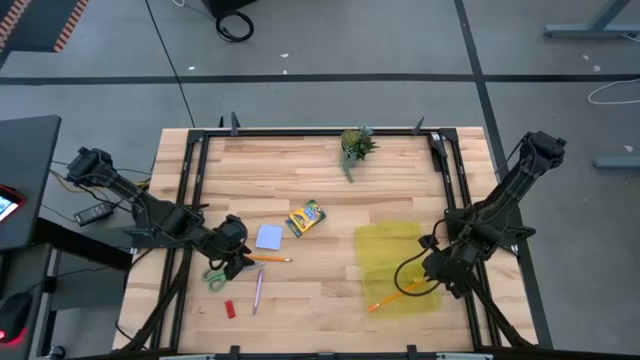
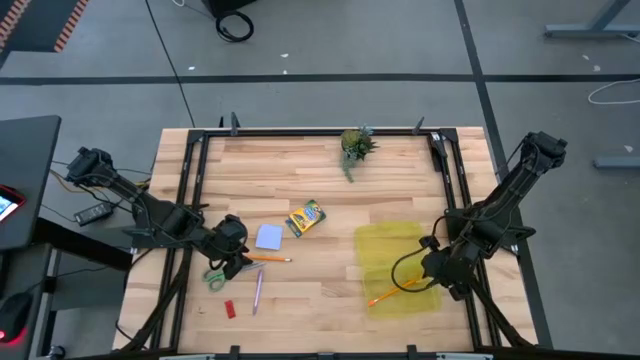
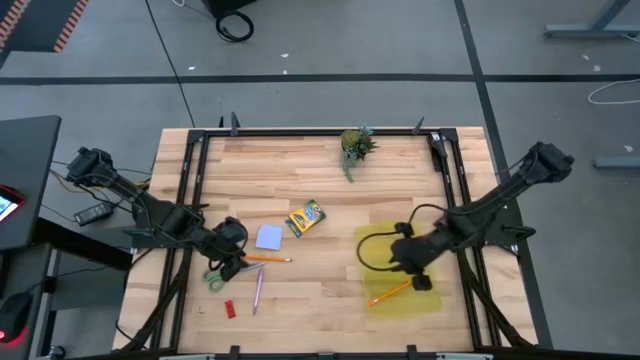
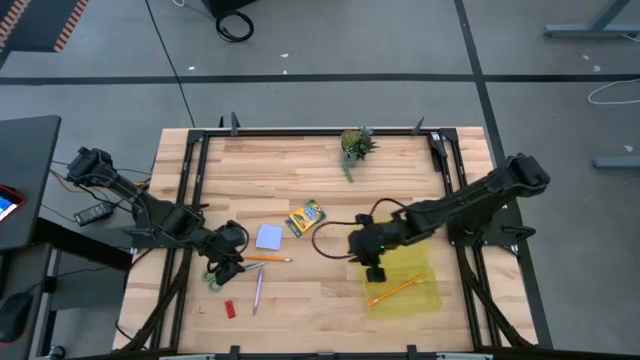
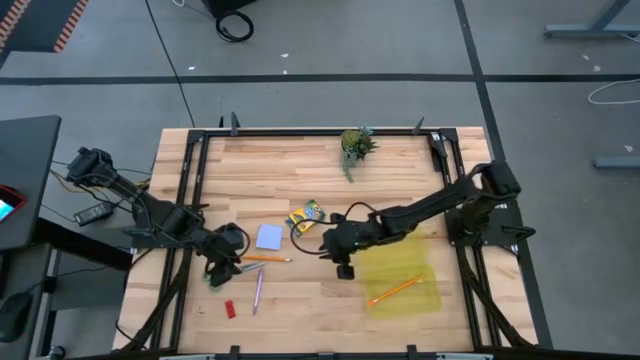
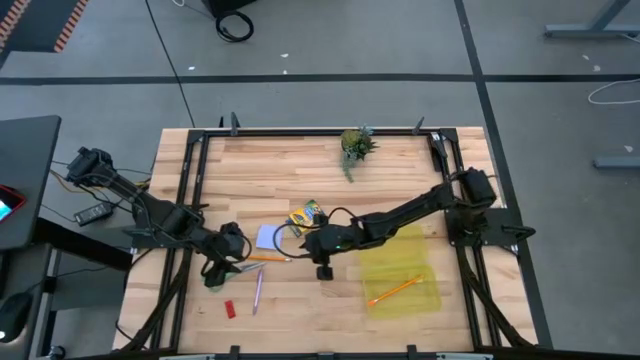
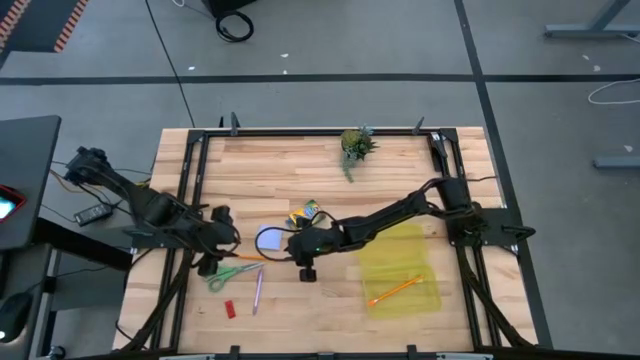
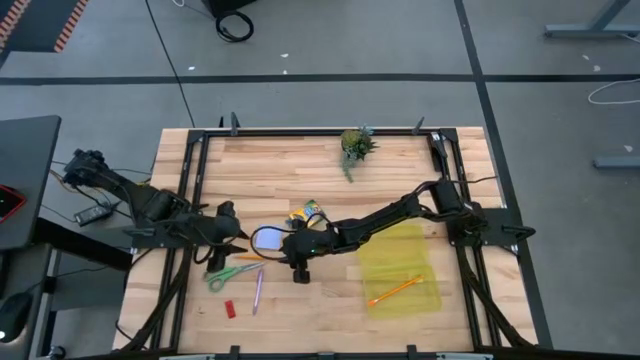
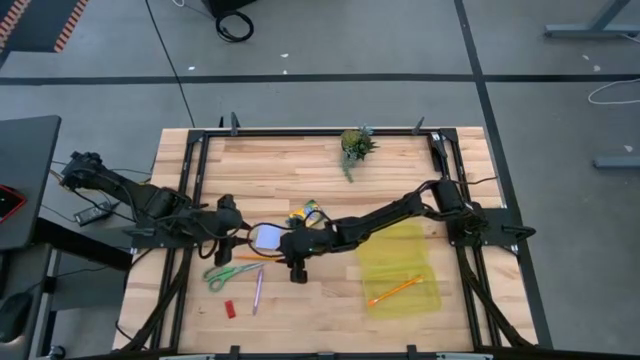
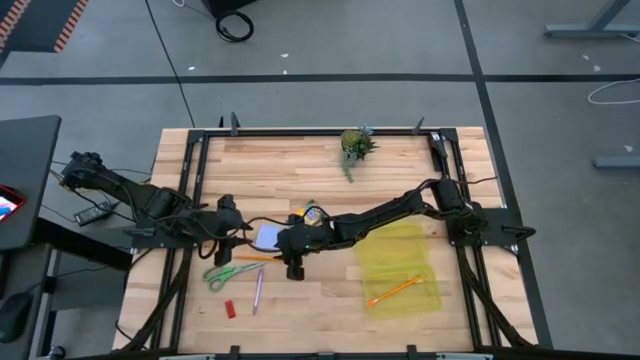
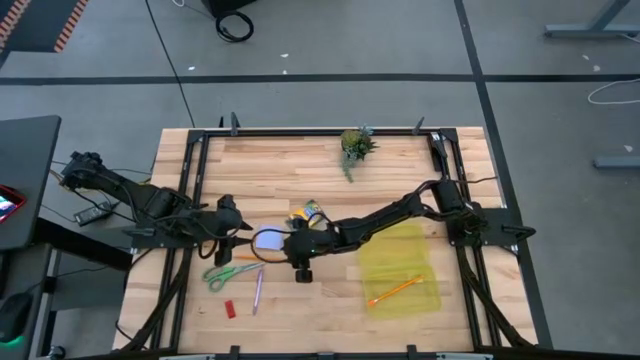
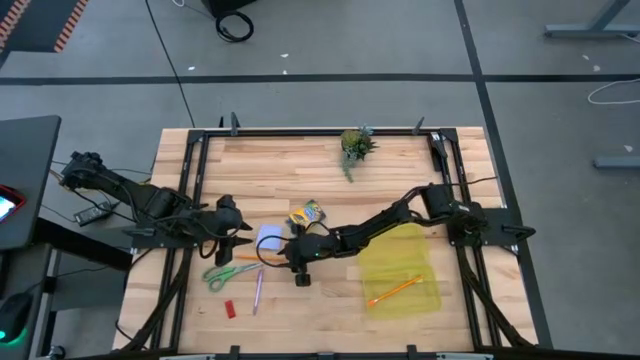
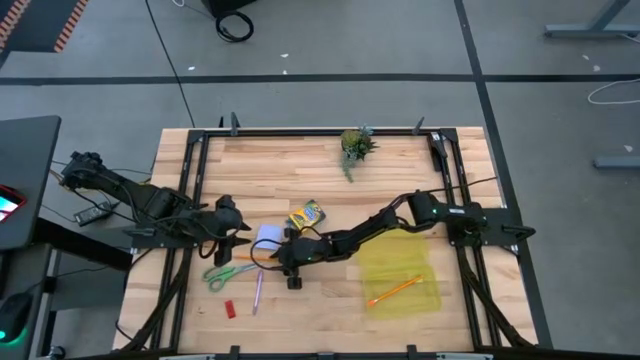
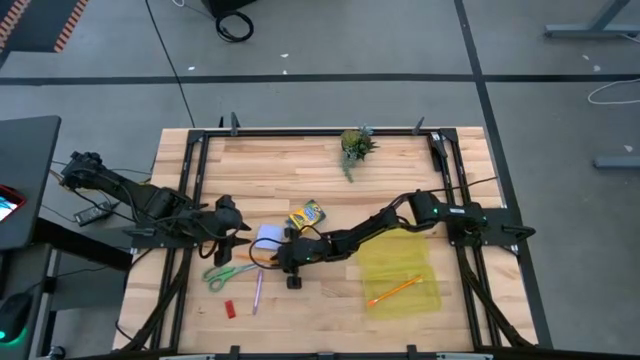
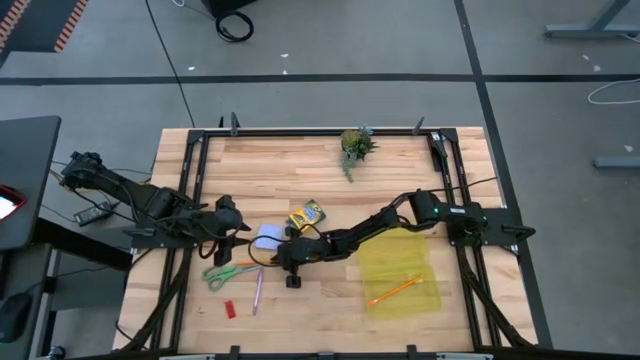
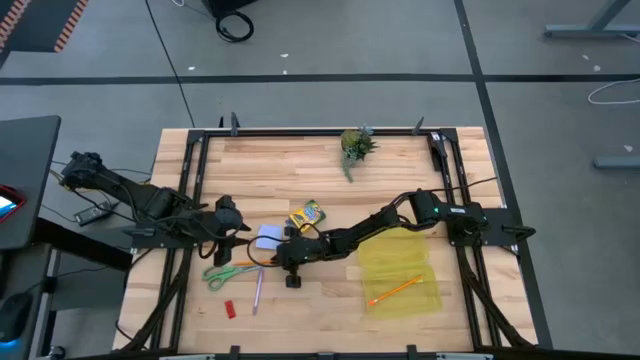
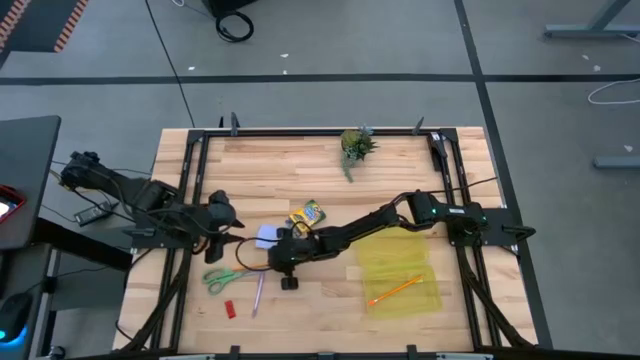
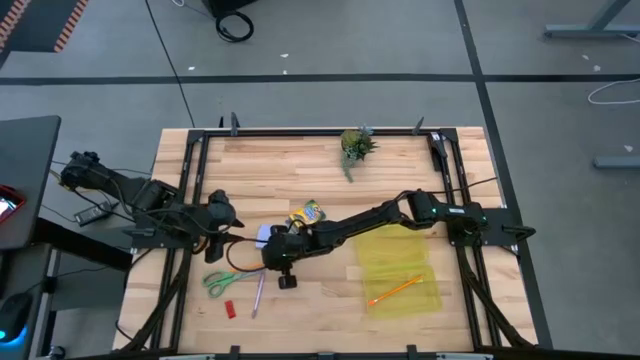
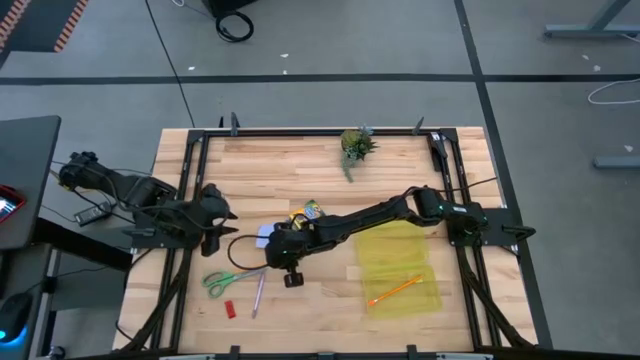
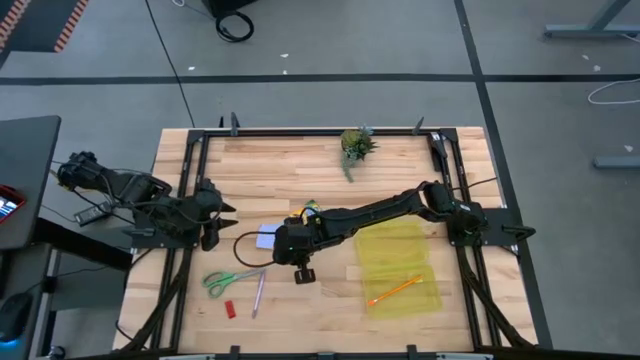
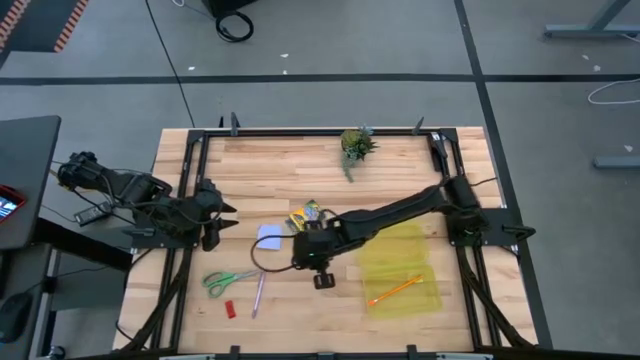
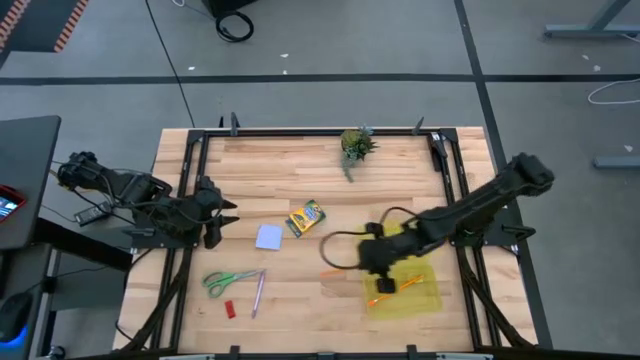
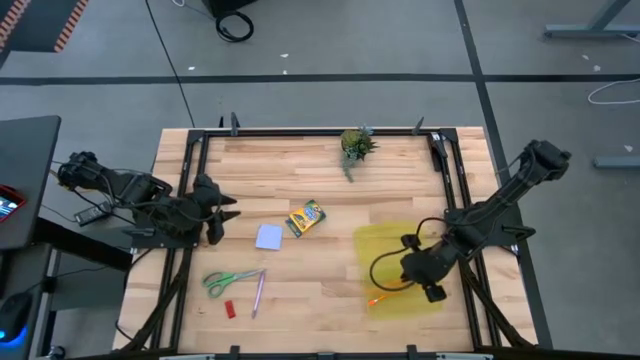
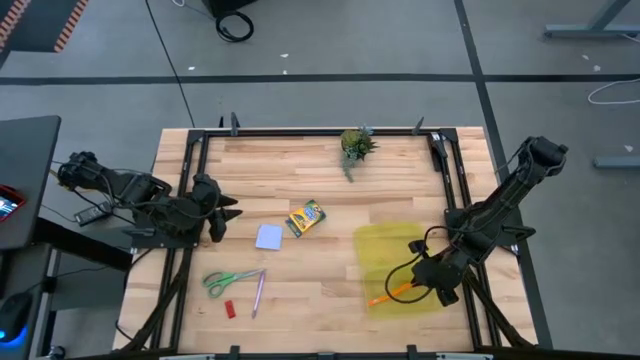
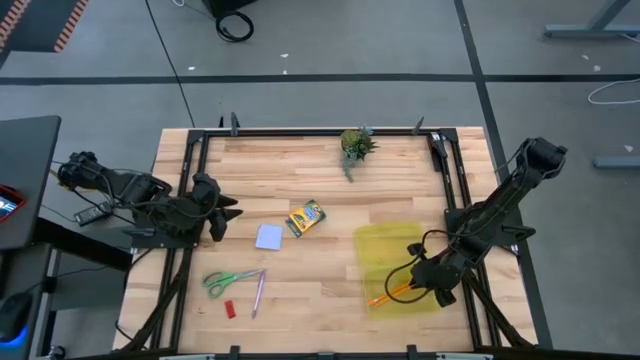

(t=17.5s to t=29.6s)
Task: Pack school essentials
Put the orange pencil into the yellow supply box

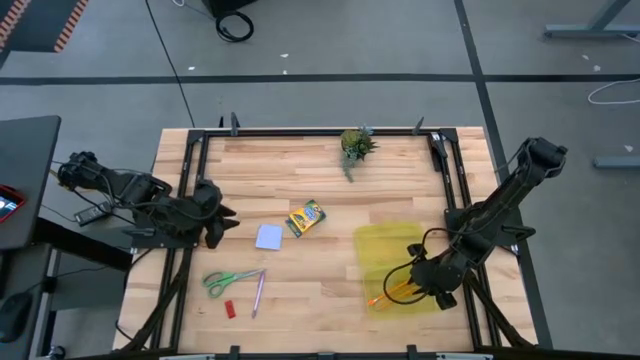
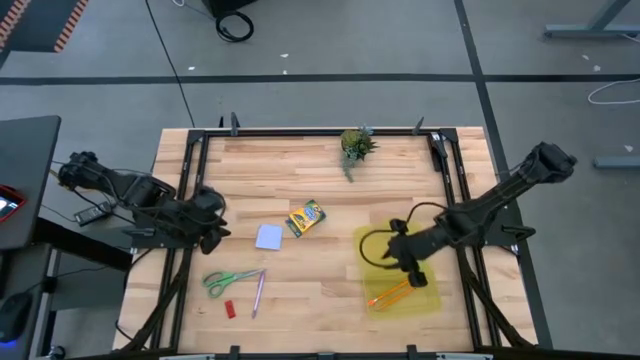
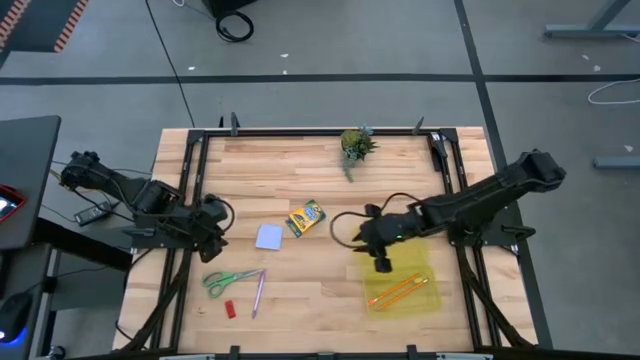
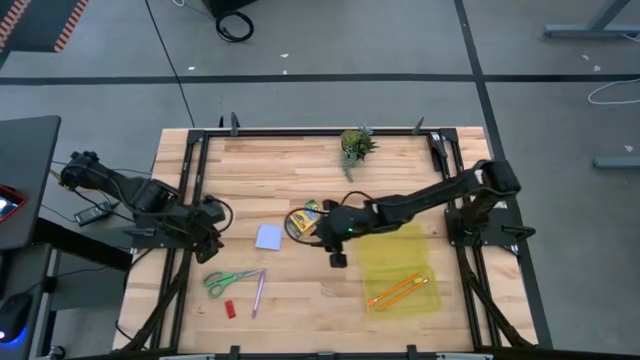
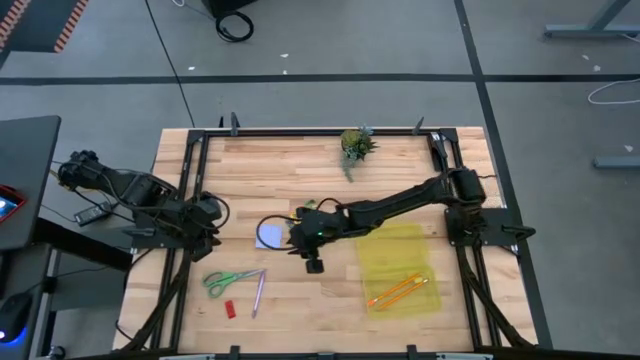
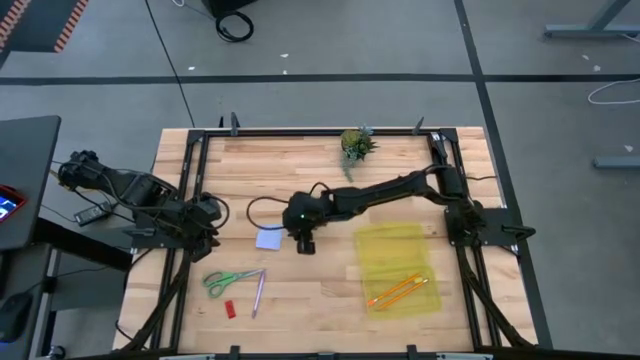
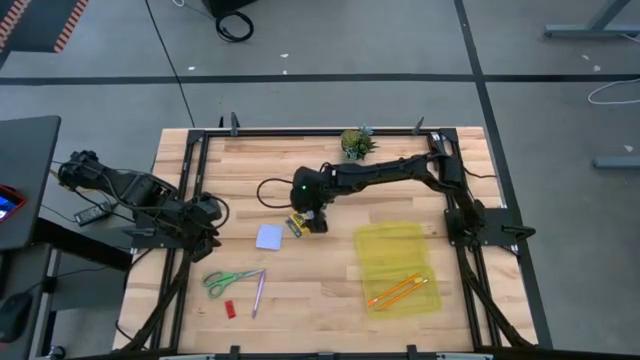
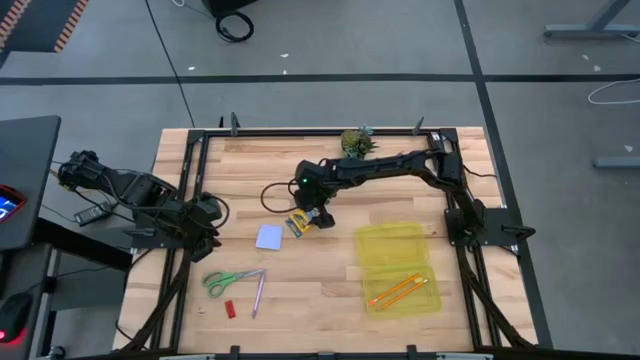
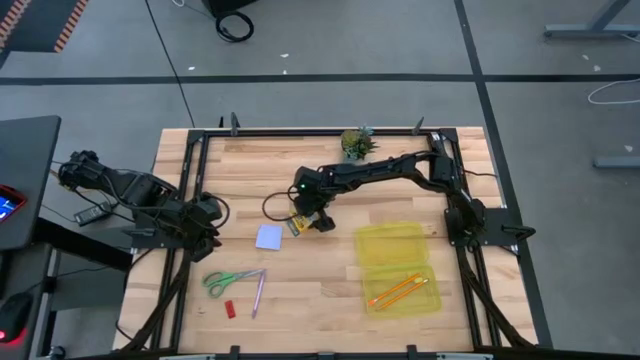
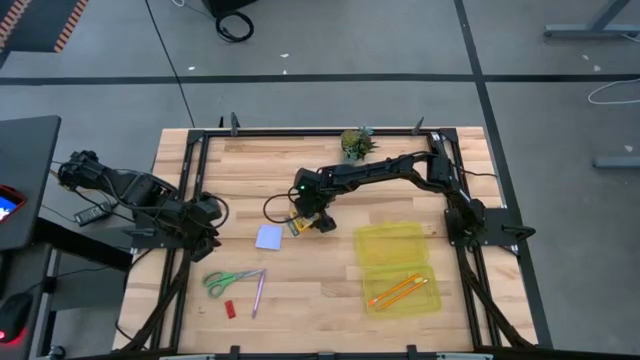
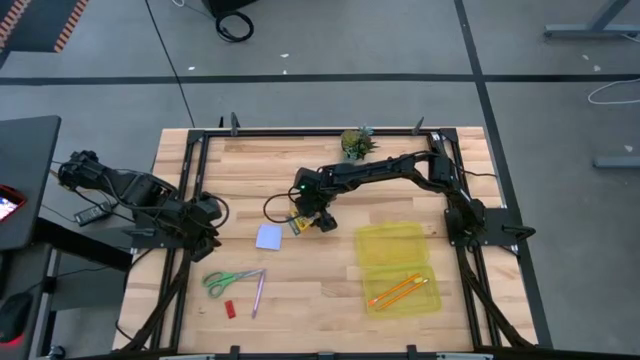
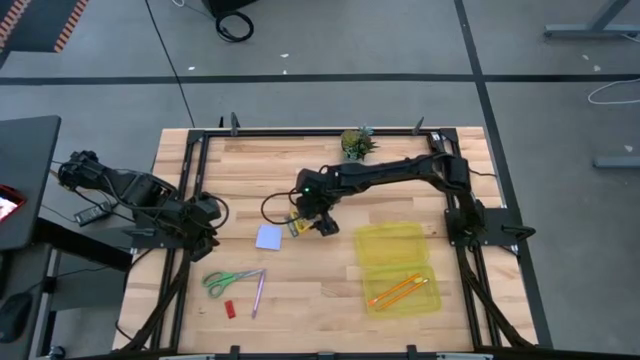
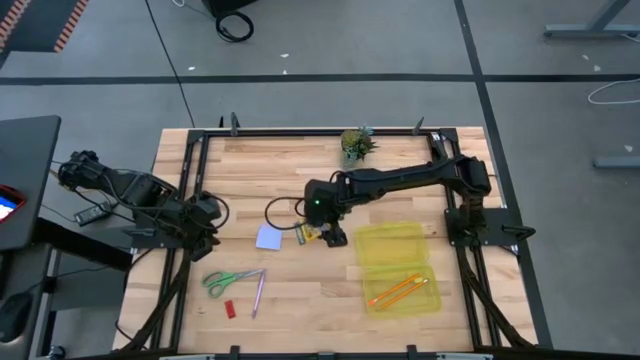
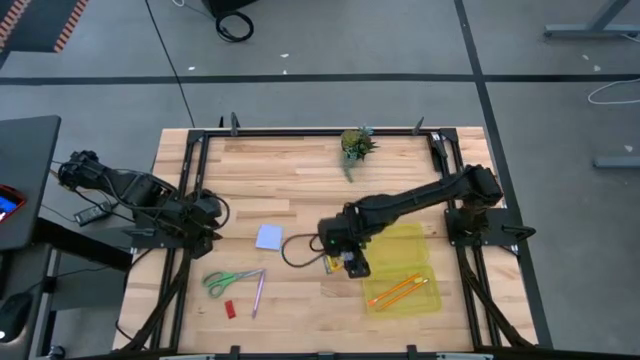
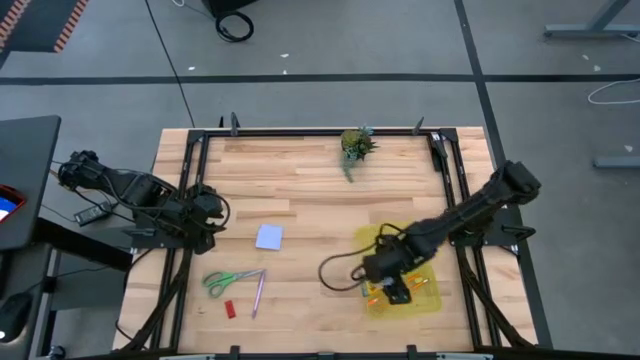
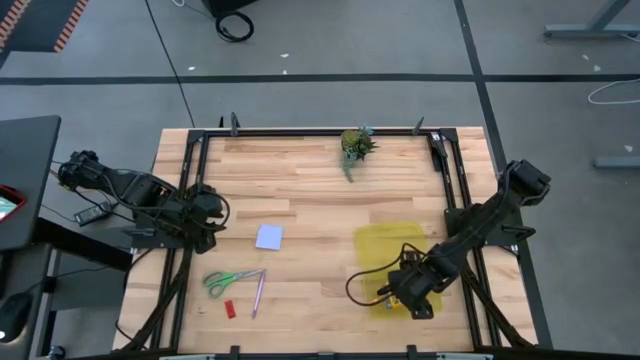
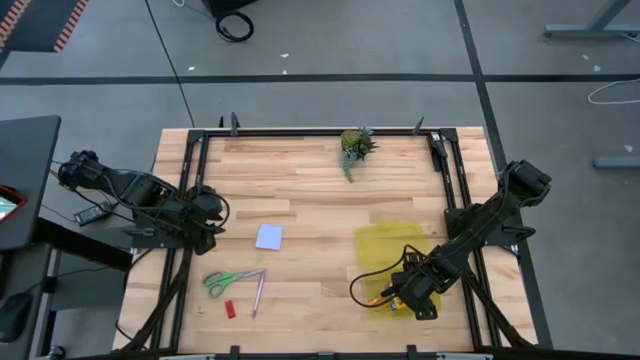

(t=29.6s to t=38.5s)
Put the yellow crayon box into the yellow supply box
